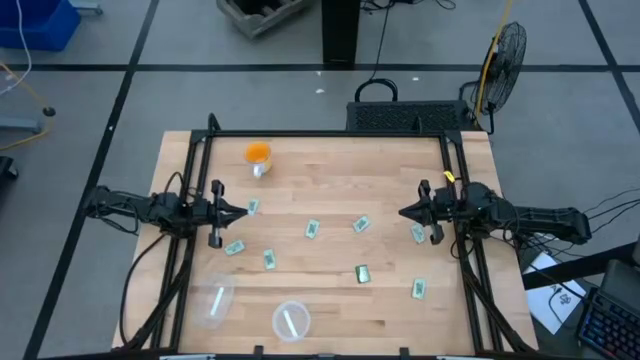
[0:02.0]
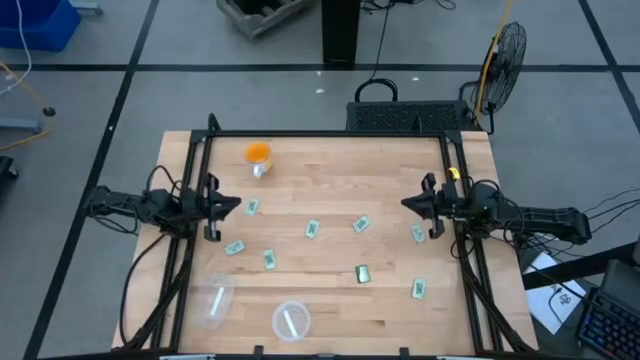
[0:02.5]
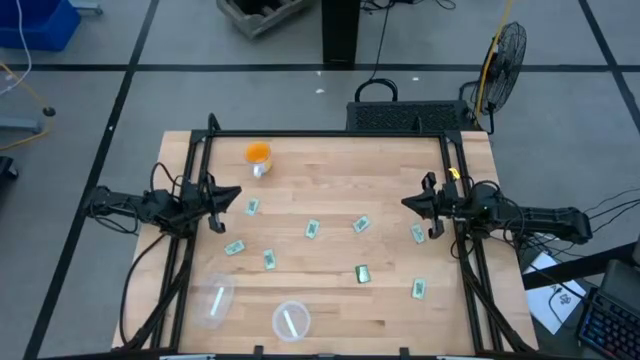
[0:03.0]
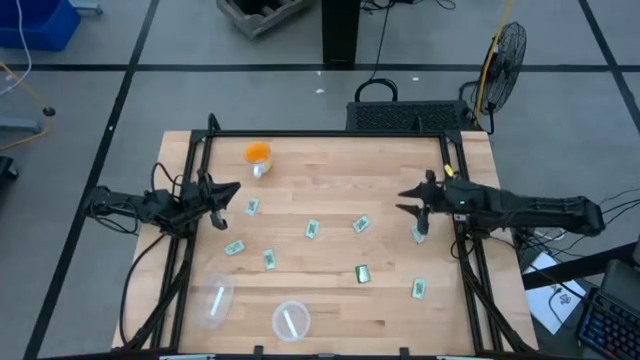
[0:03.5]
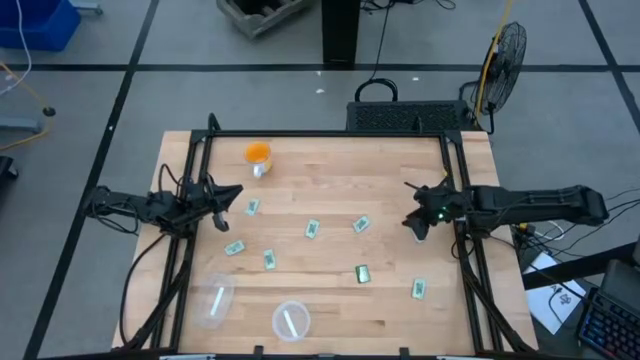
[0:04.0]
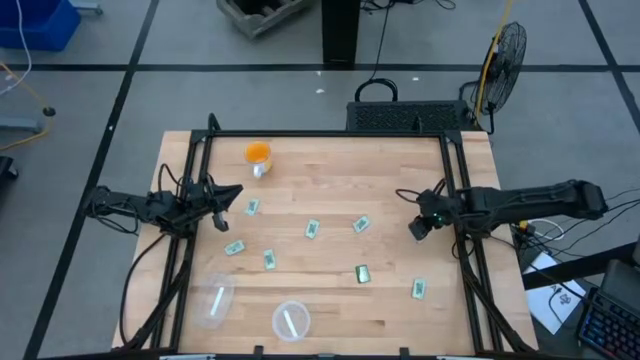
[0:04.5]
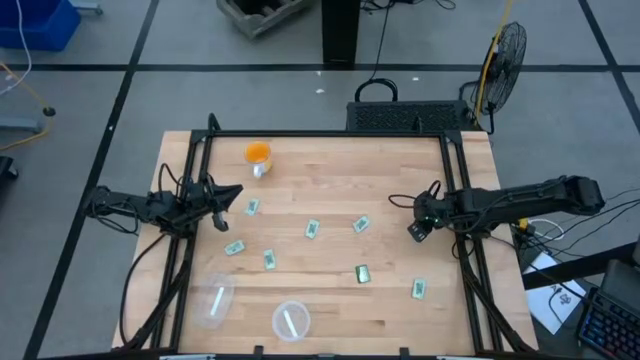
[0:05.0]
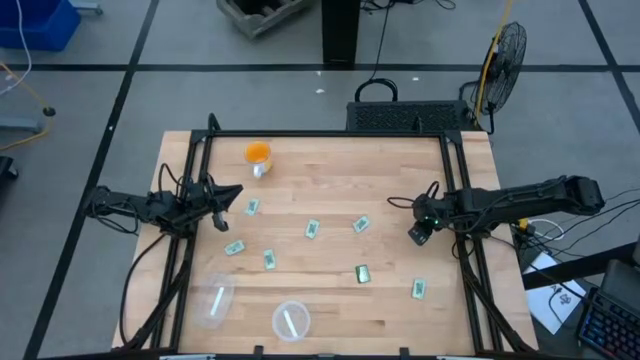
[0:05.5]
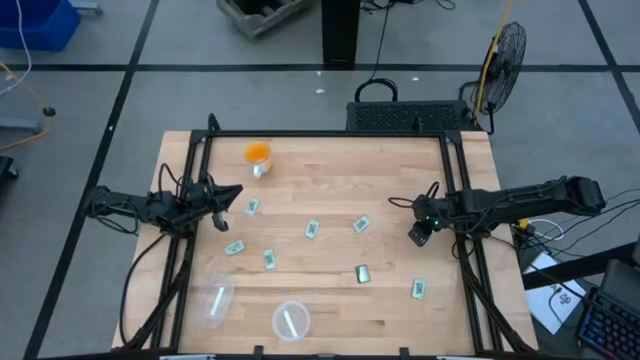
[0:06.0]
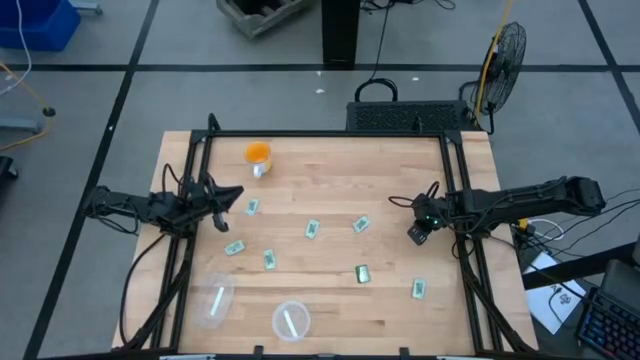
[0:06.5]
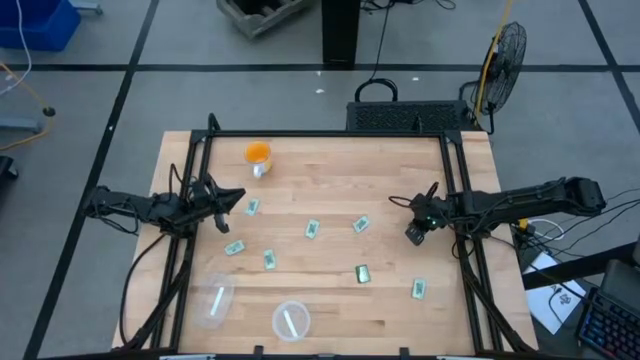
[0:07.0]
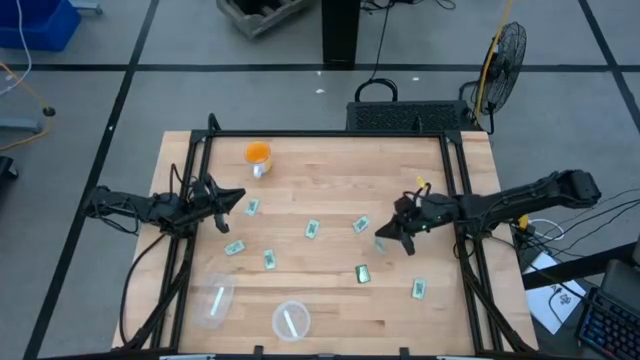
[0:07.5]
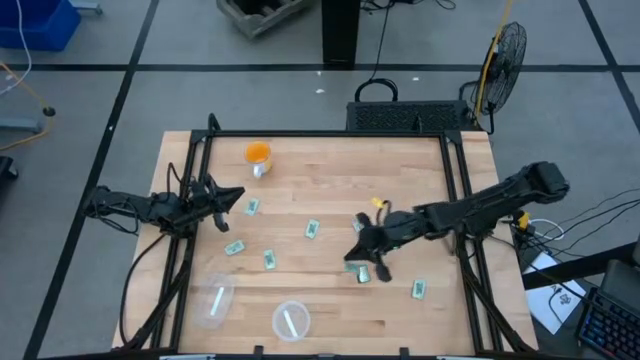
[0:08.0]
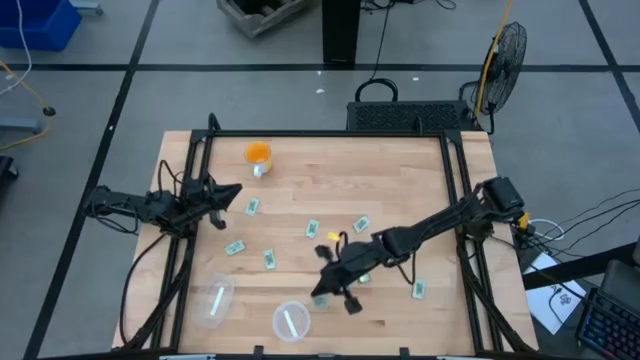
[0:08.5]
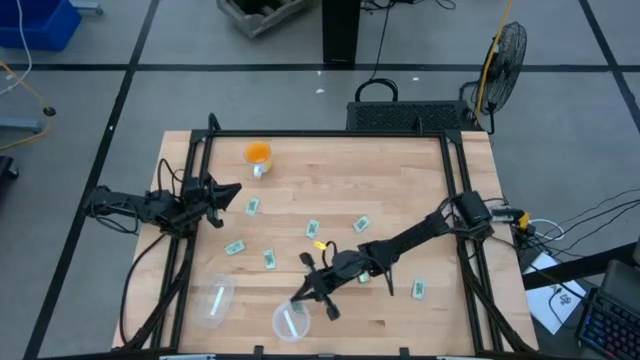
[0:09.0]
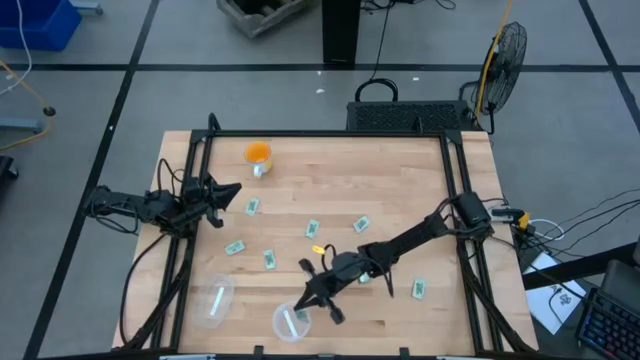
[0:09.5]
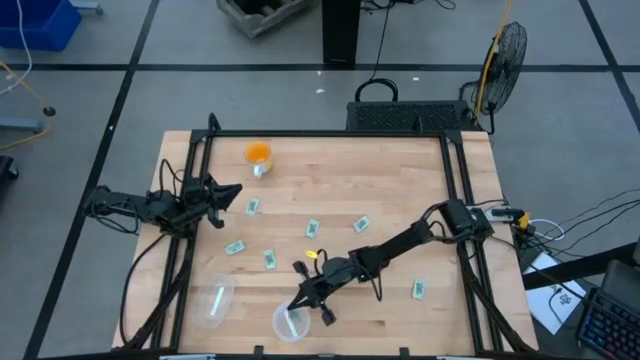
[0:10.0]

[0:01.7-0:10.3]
Task: Pick and place items into bin
Put the stevia packet into the right transparent bin

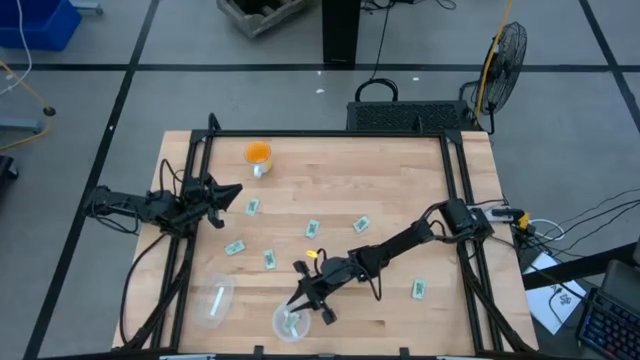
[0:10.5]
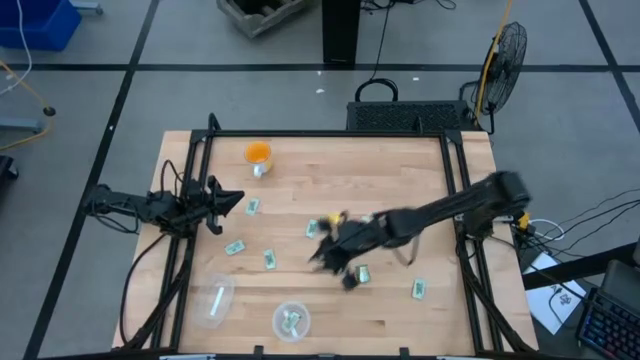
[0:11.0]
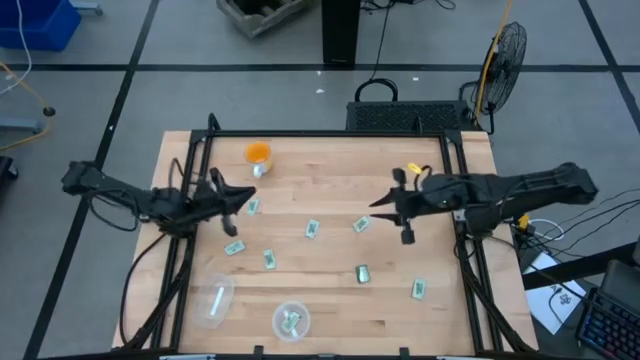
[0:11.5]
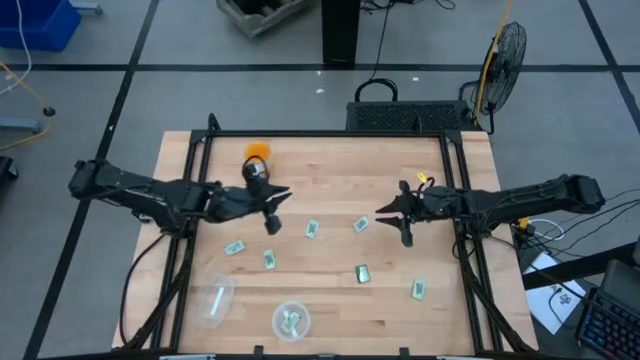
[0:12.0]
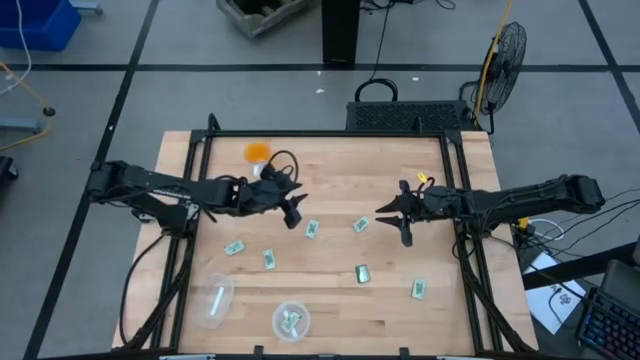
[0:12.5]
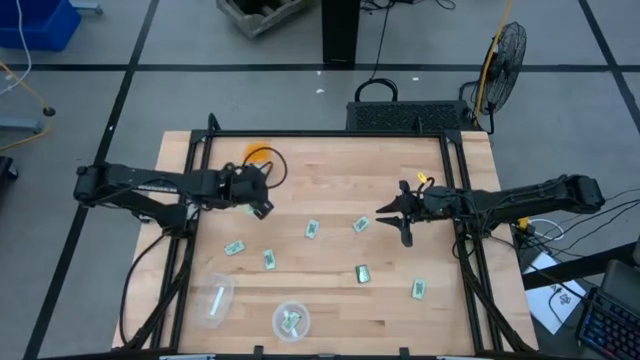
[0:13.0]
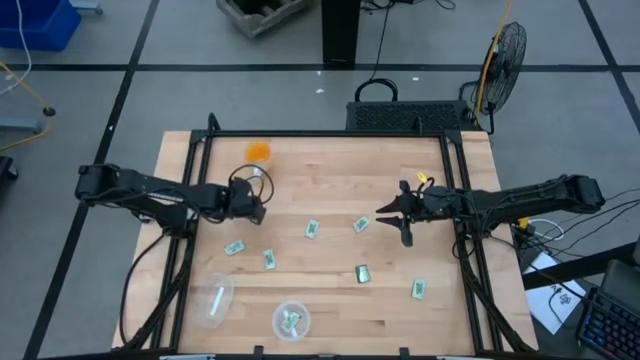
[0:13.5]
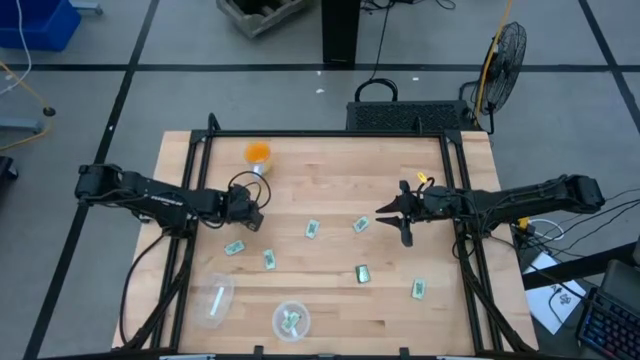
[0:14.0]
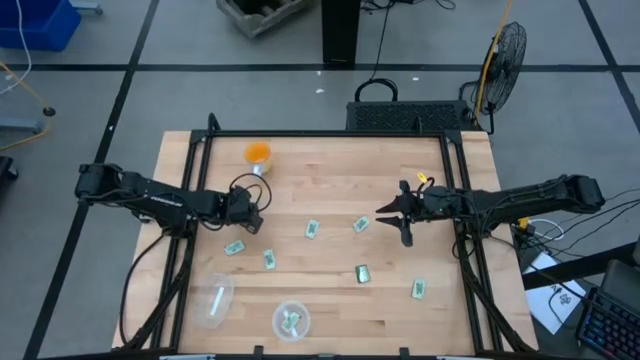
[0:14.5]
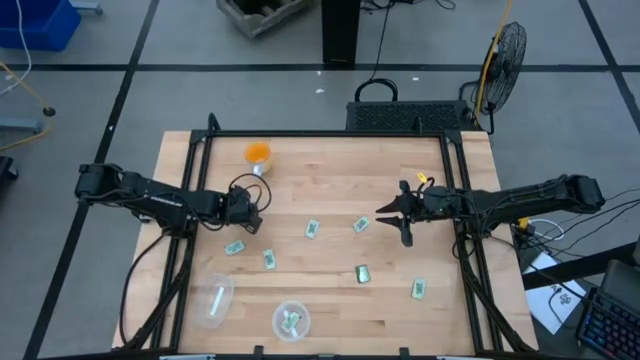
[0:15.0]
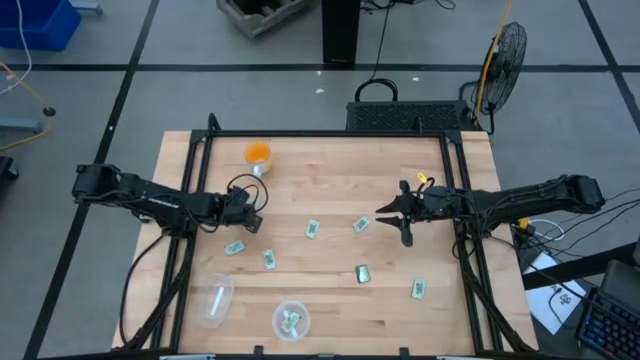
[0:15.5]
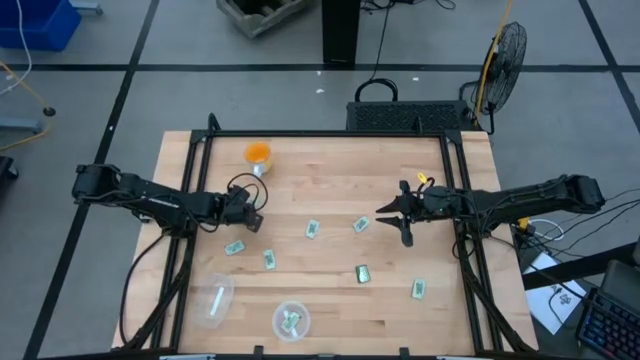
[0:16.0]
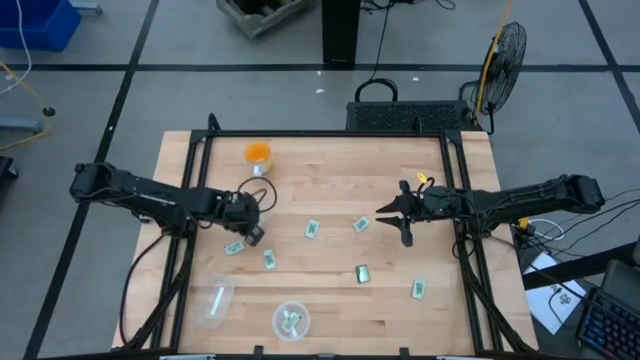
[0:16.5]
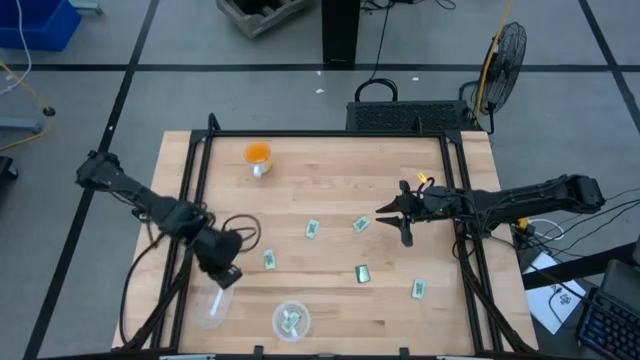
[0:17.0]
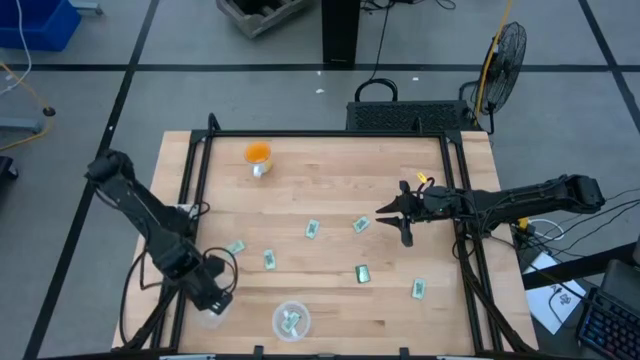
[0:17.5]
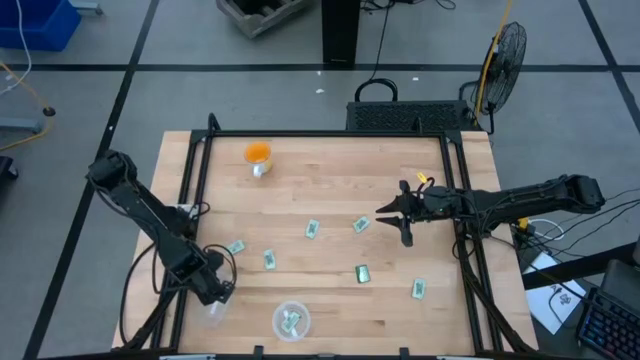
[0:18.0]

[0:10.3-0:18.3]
Put the stevia packet into the left transparent bin

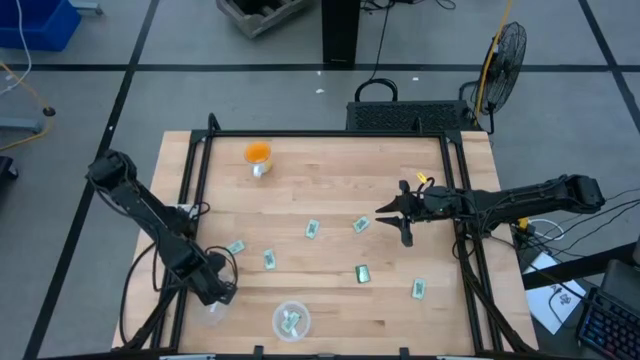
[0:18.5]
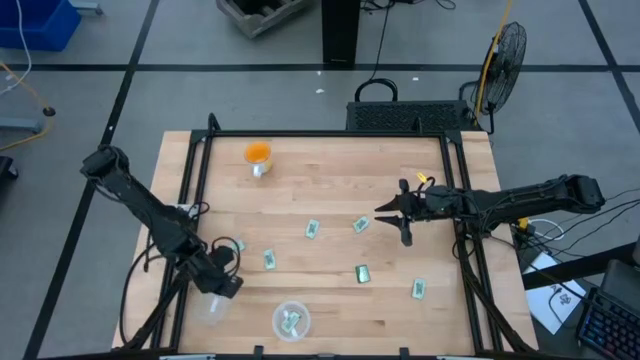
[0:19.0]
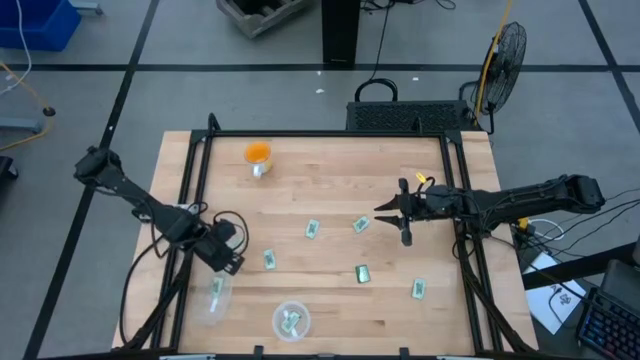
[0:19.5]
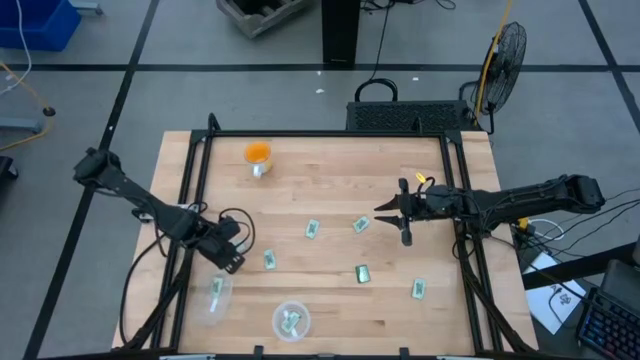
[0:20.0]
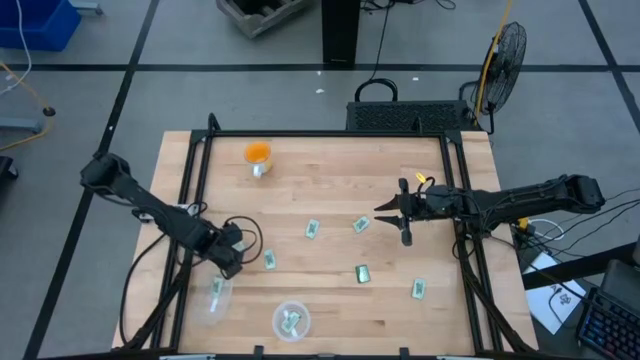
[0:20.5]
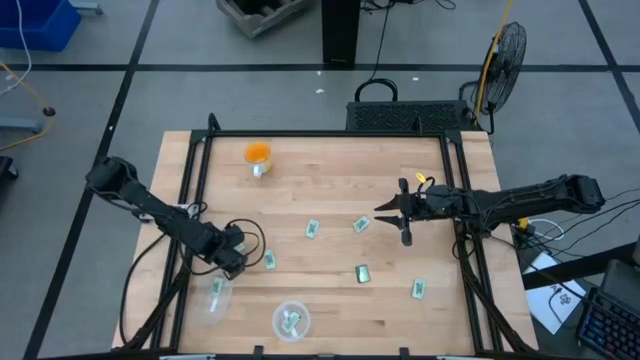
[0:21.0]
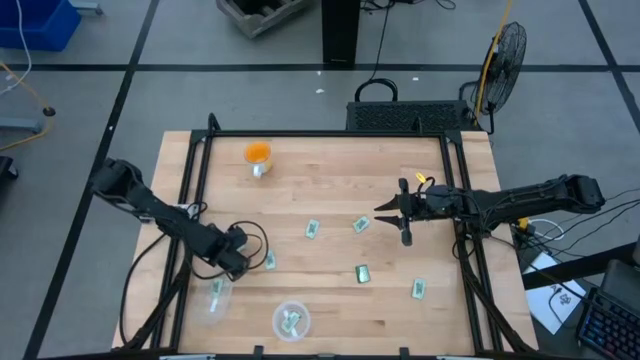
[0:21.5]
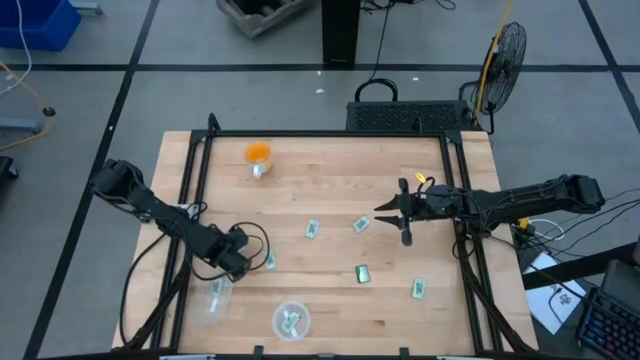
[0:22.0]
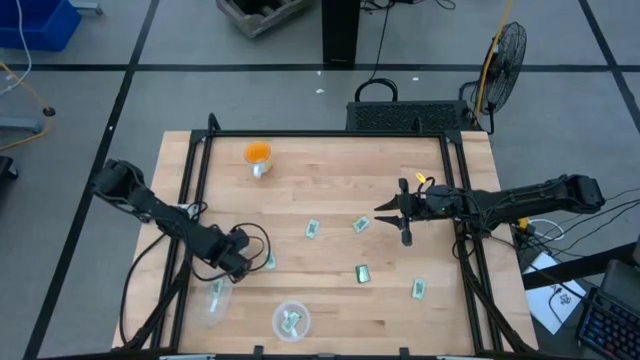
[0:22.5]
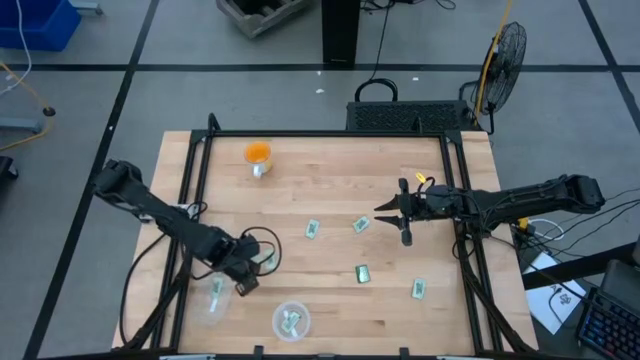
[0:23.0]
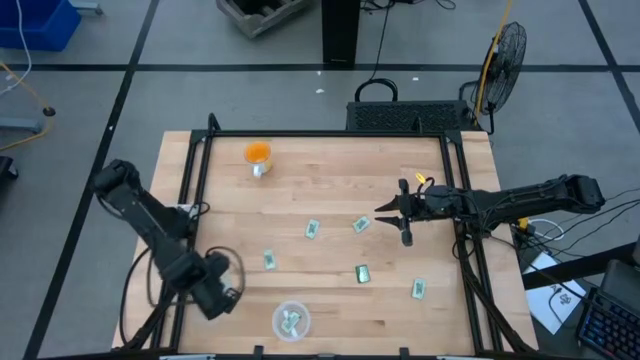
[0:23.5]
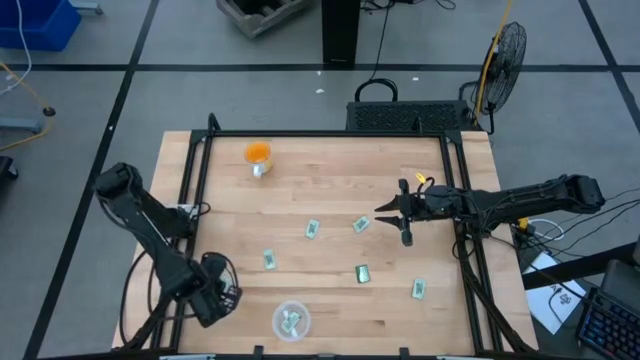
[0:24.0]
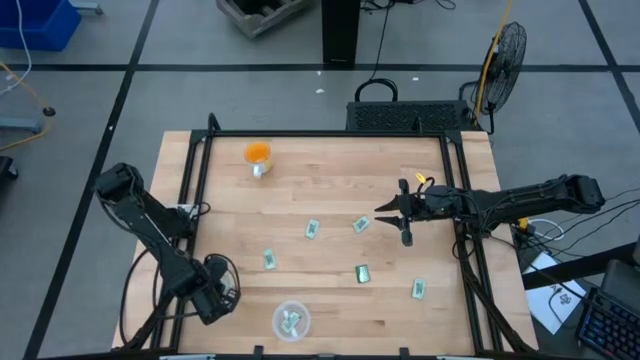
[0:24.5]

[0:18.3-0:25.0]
Put the stevia packet into the left transparent bin
